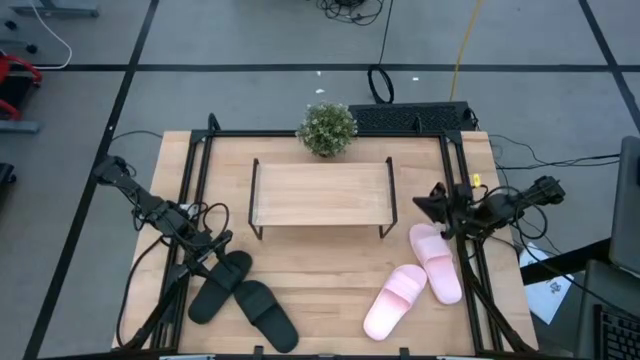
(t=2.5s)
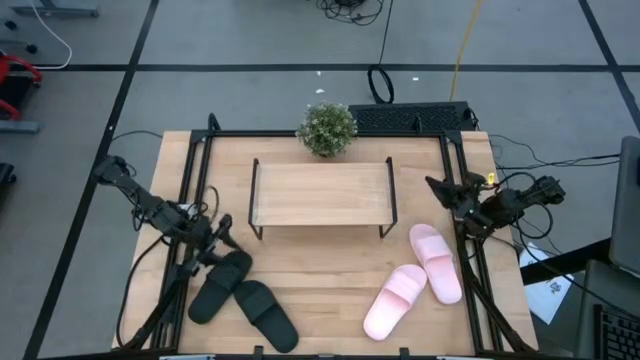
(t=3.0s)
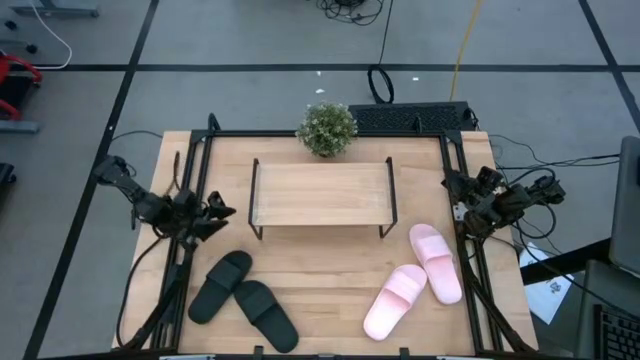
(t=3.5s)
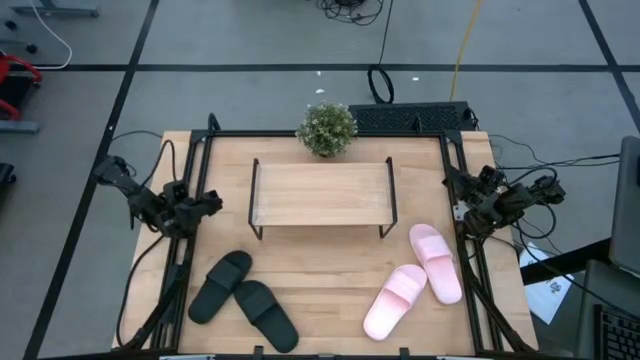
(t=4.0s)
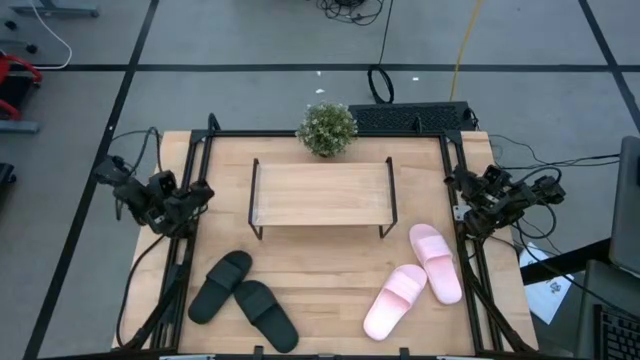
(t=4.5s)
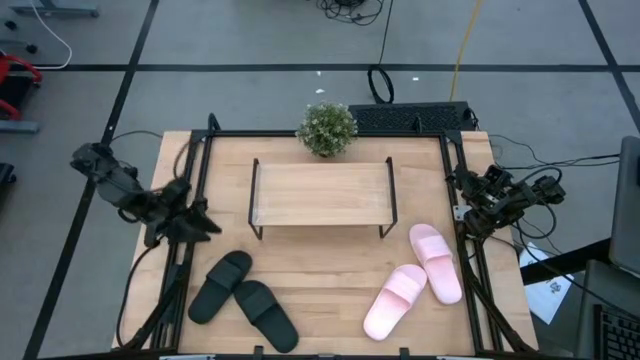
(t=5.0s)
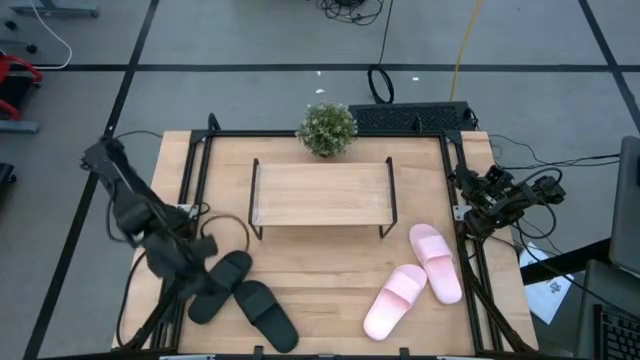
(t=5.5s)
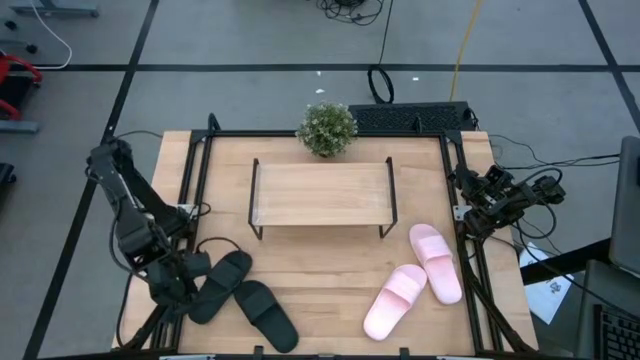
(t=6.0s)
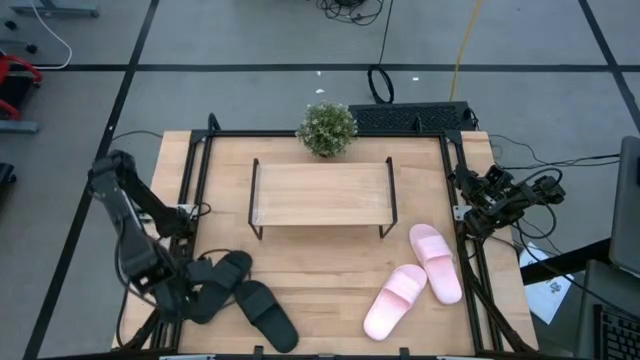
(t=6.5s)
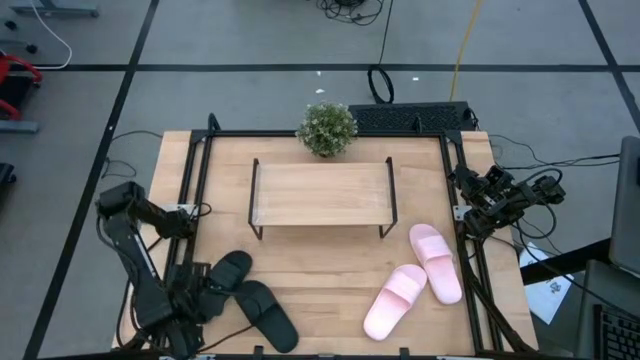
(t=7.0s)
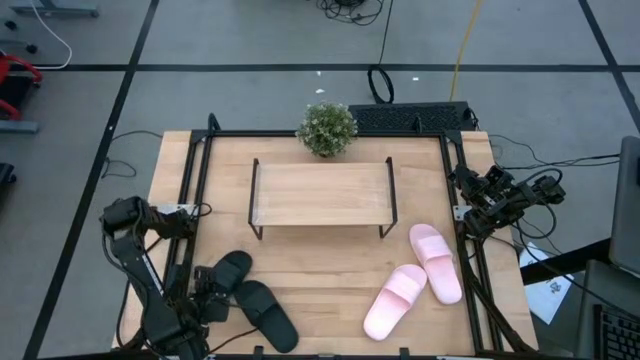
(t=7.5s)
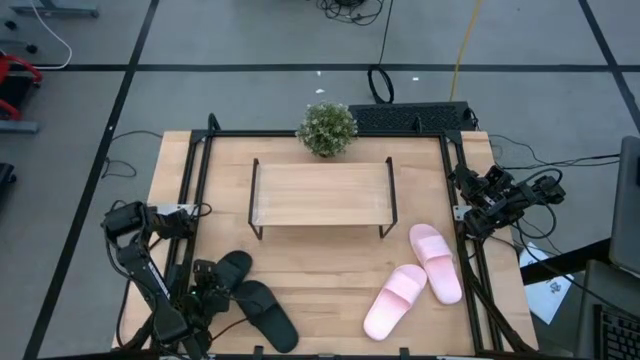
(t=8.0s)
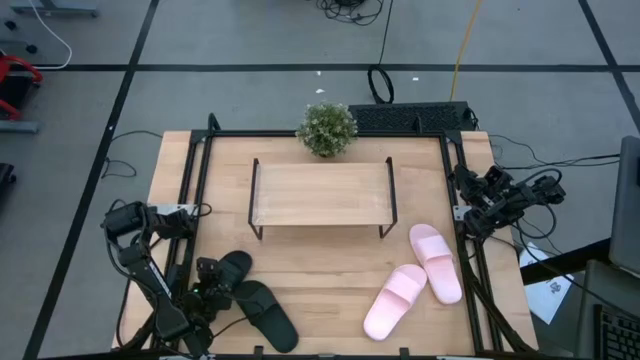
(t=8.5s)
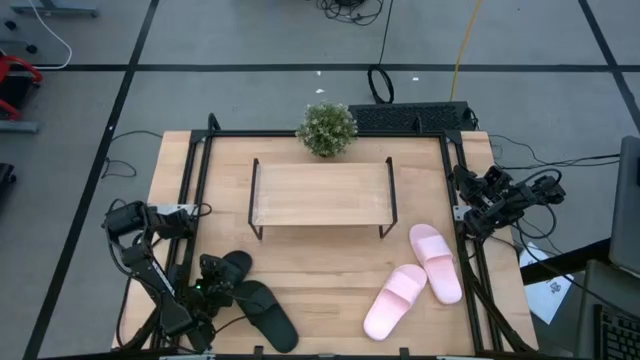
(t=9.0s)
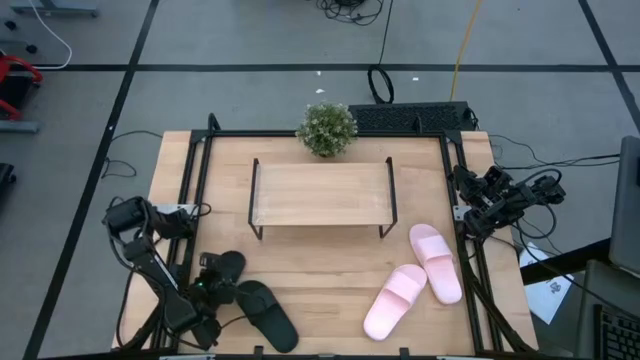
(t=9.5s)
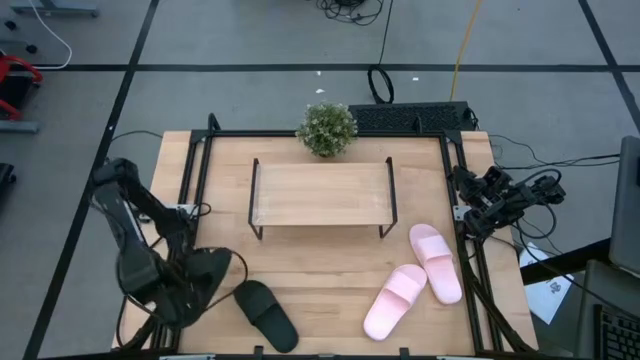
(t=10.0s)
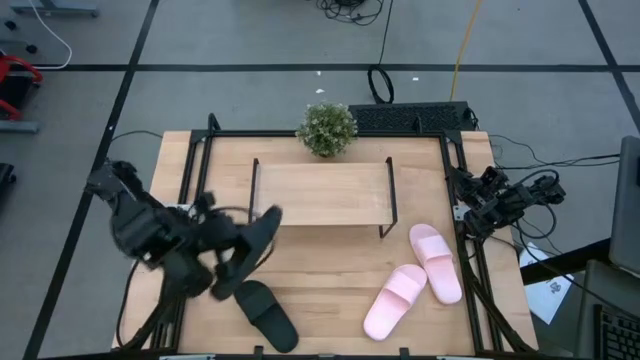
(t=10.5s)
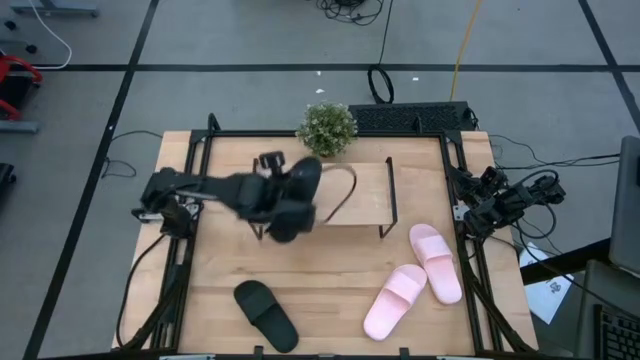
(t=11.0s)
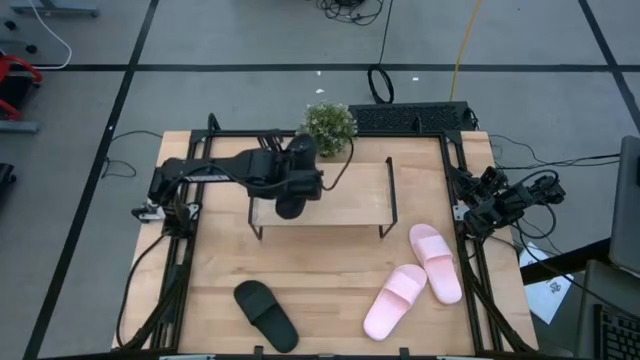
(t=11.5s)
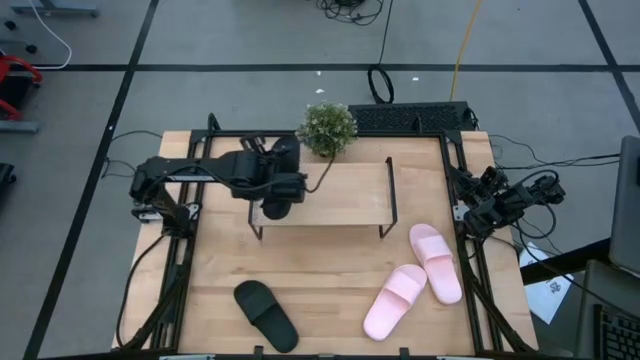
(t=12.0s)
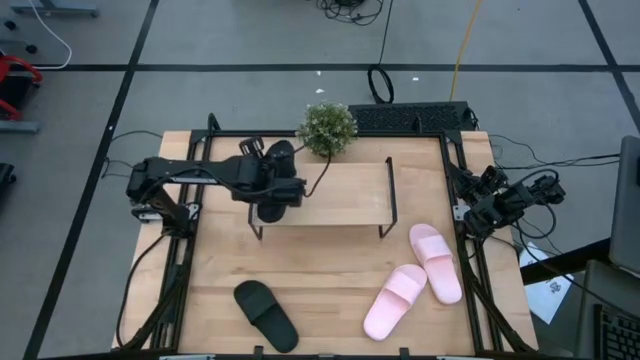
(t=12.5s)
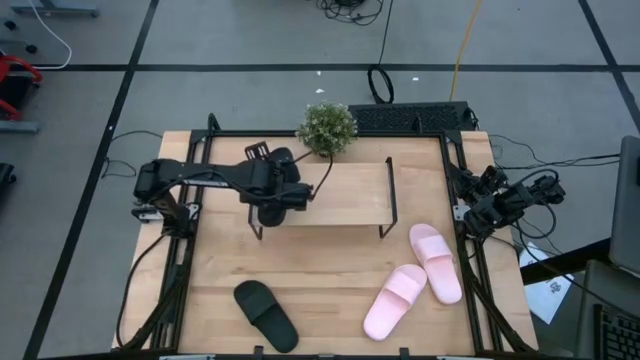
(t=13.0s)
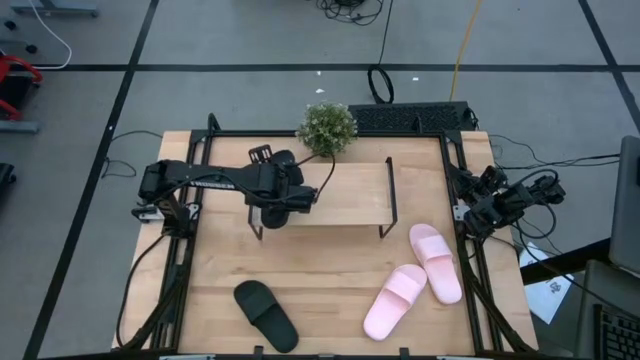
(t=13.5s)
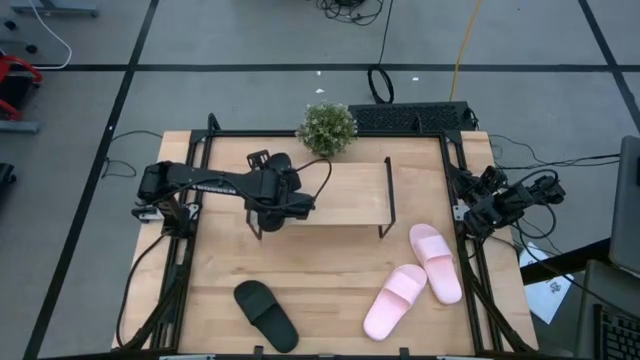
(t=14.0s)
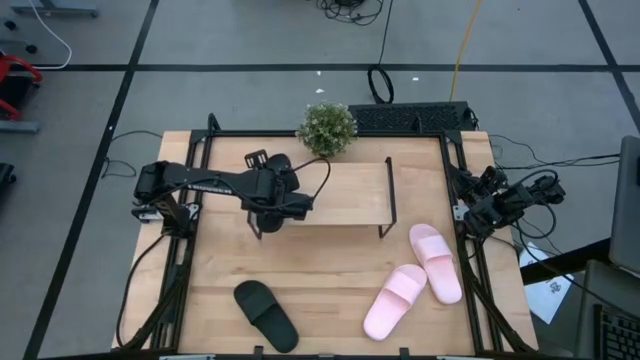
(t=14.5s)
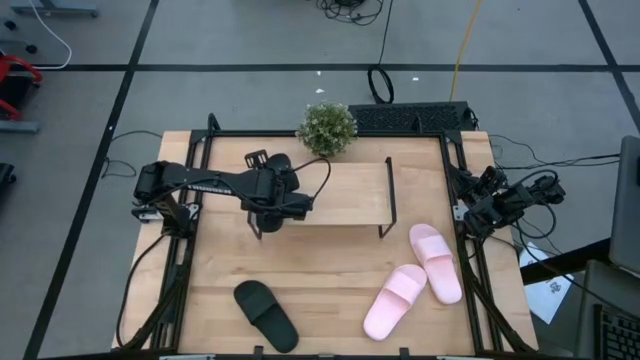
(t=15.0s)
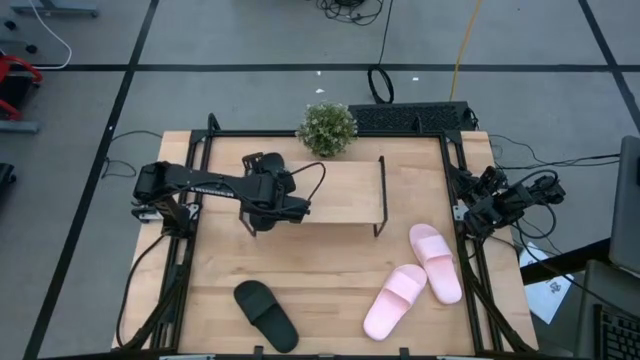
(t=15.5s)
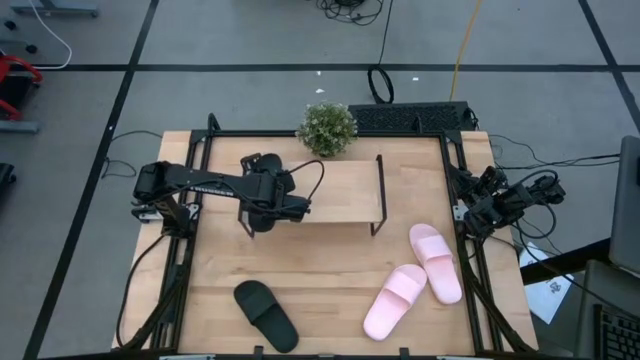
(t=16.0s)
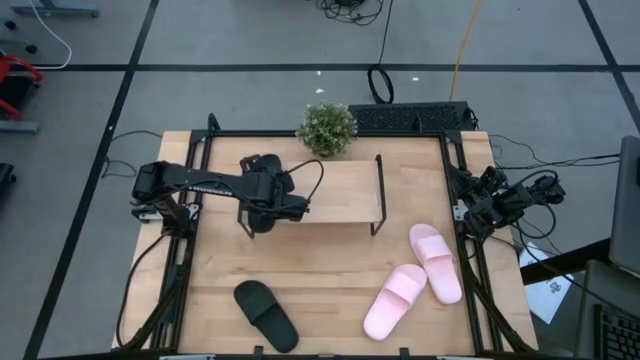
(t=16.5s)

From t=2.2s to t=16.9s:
Task: Pick and place slides into the shelf
Put the top black slide on the shelf

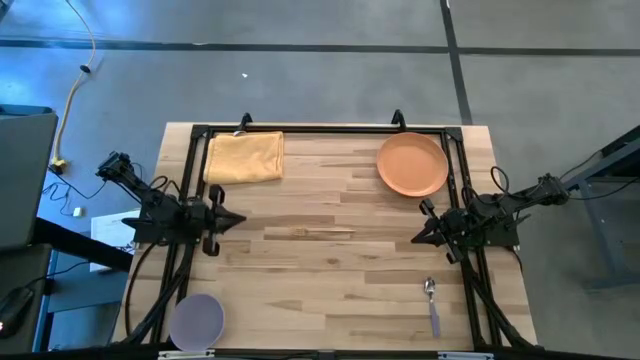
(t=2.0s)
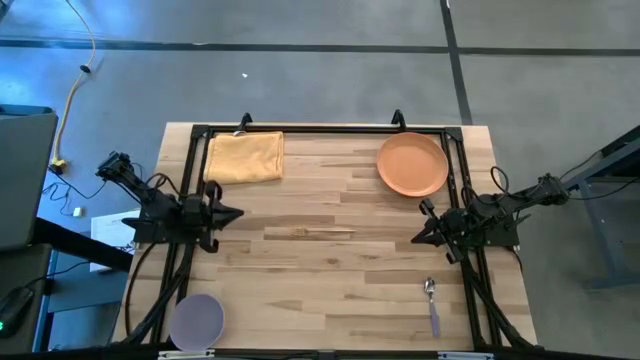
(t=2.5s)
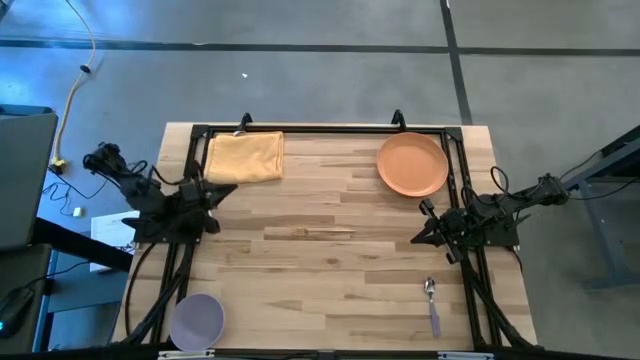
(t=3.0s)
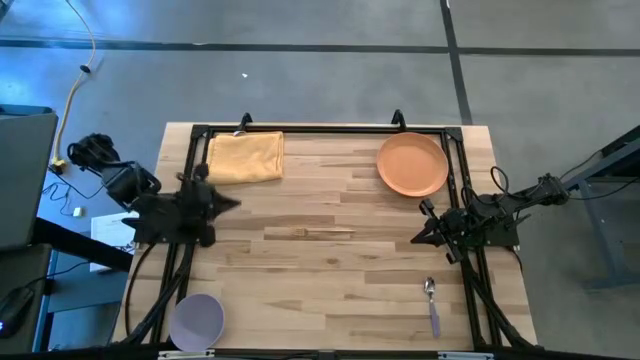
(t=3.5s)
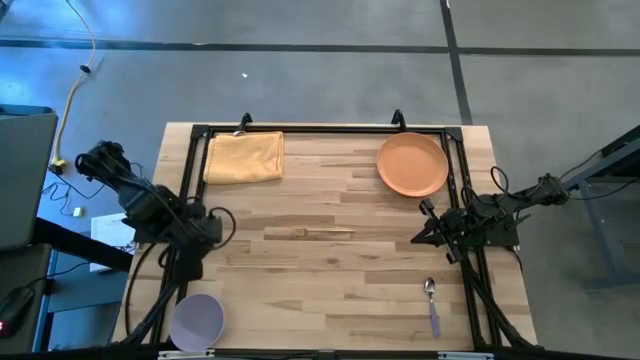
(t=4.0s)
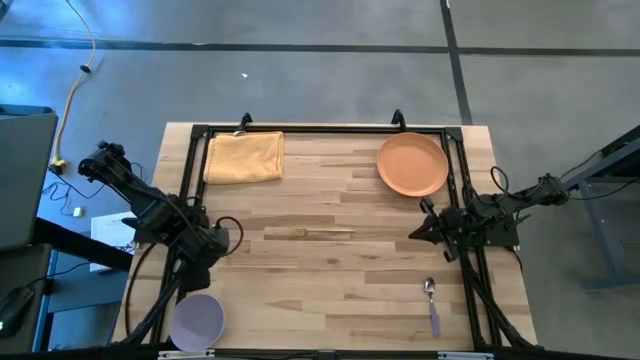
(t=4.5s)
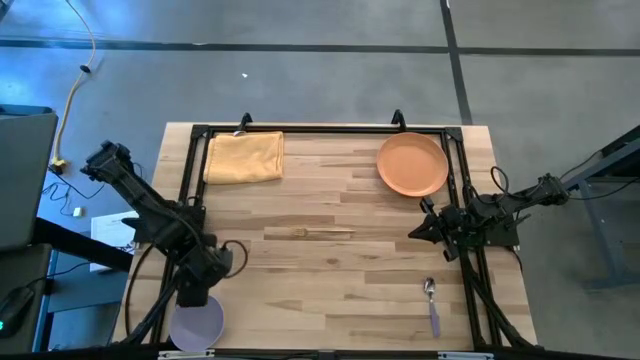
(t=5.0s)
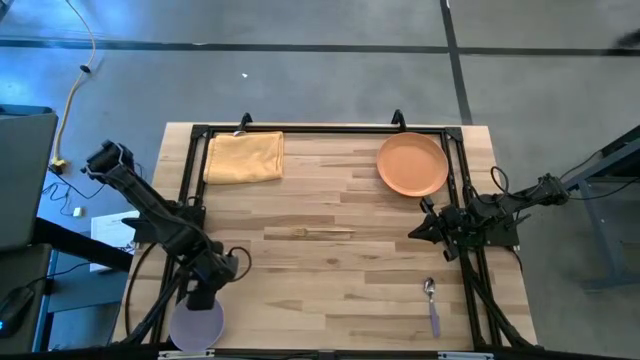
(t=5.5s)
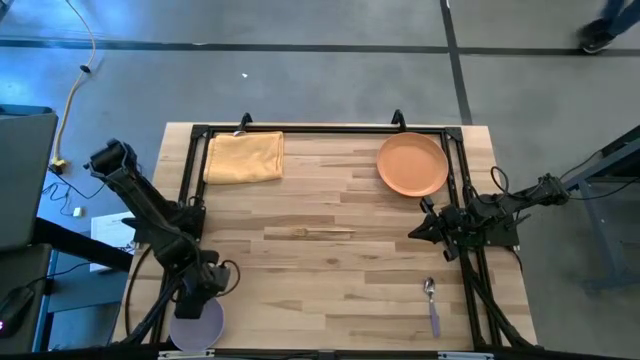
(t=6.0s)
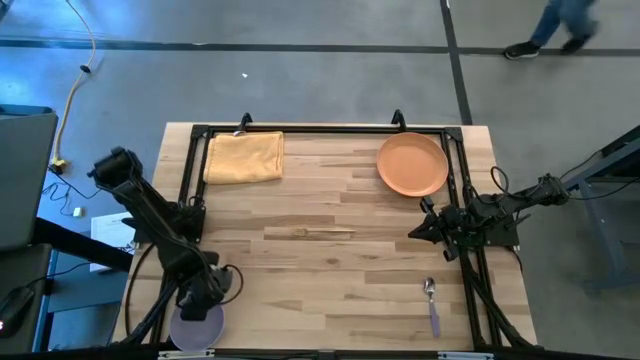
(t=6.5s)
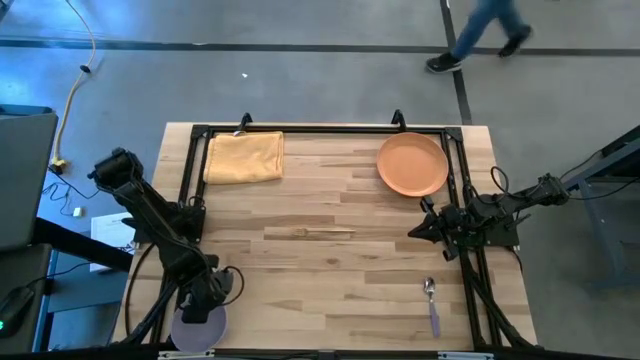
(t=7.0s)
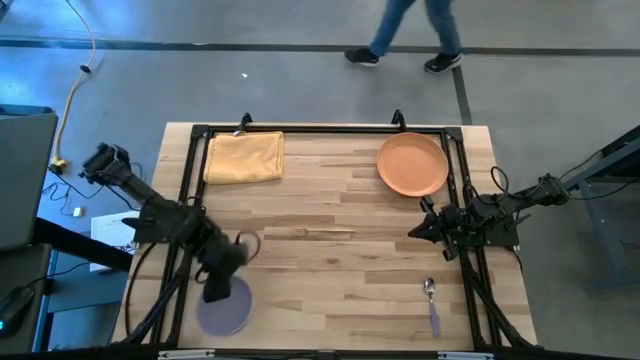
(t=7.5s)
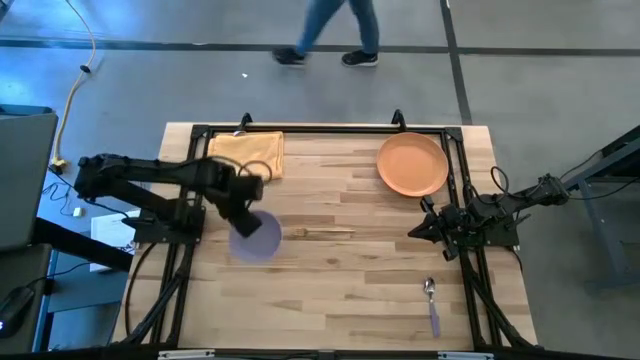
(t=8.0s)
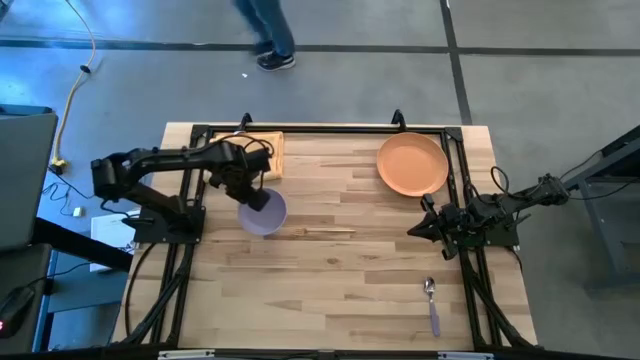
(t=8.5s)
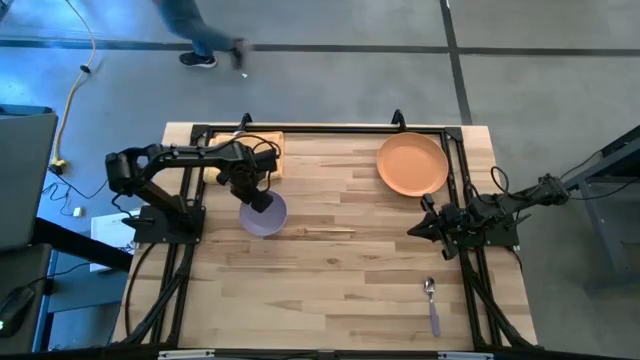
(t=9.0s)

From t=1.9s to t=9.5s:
Task: Set table place
Move the purple bowl to the middle left of the table
